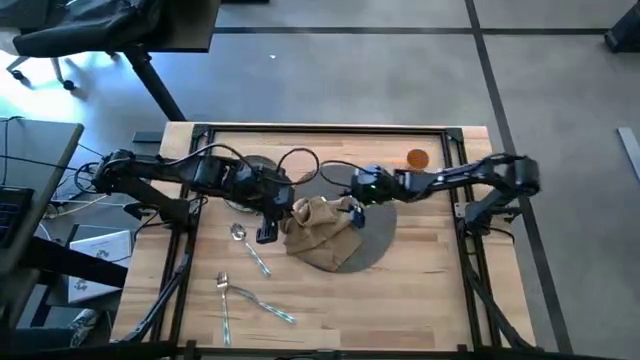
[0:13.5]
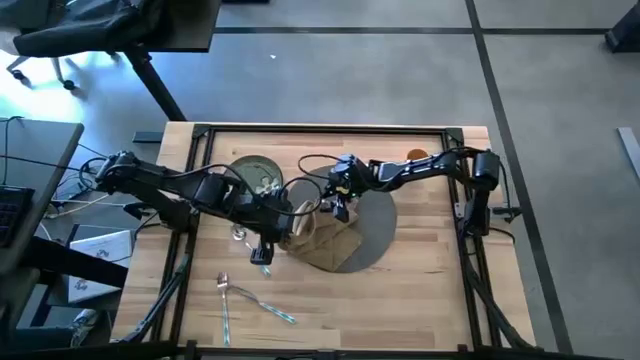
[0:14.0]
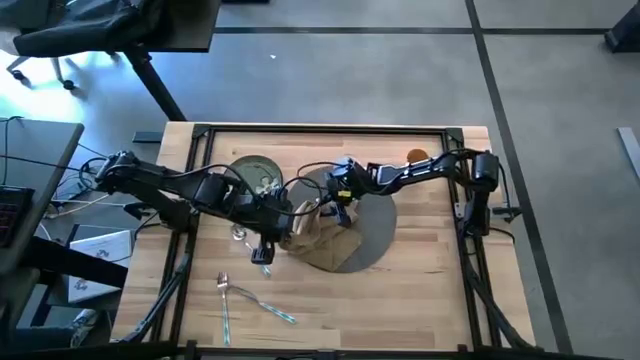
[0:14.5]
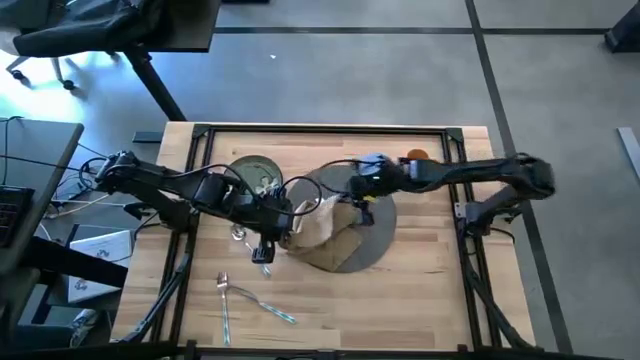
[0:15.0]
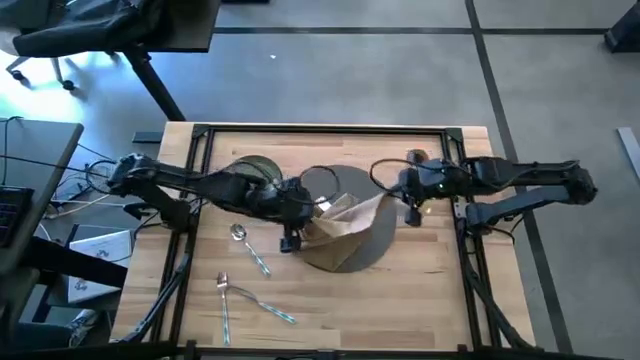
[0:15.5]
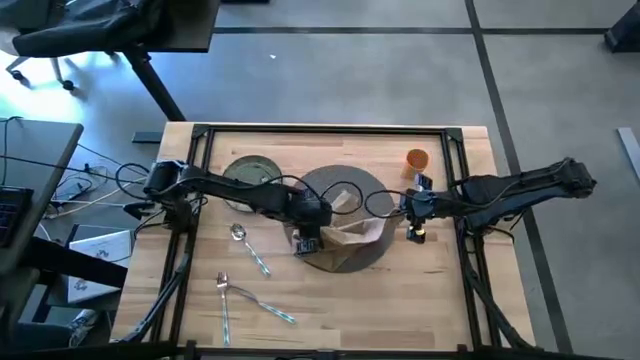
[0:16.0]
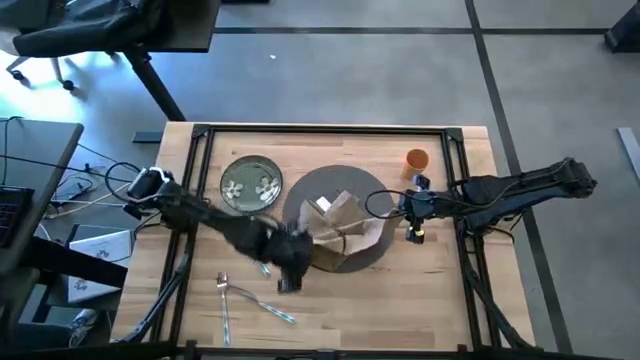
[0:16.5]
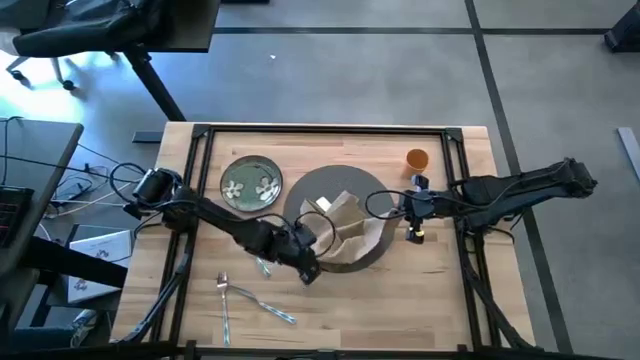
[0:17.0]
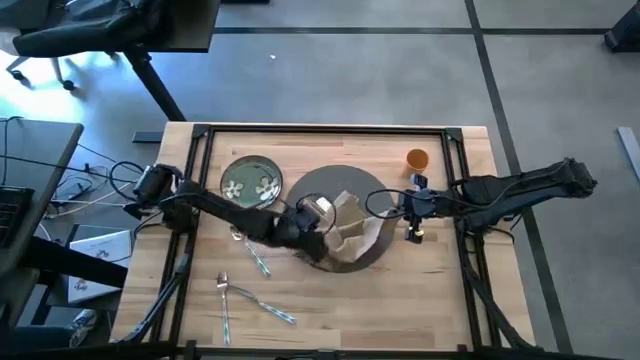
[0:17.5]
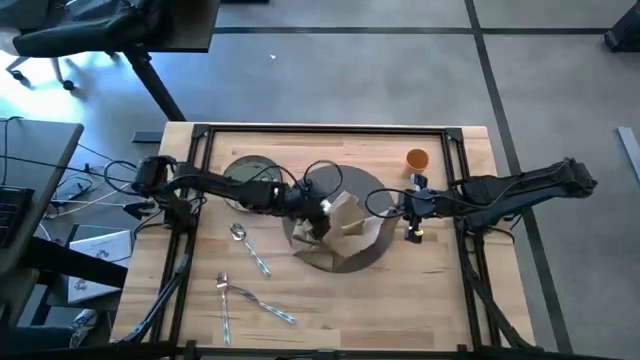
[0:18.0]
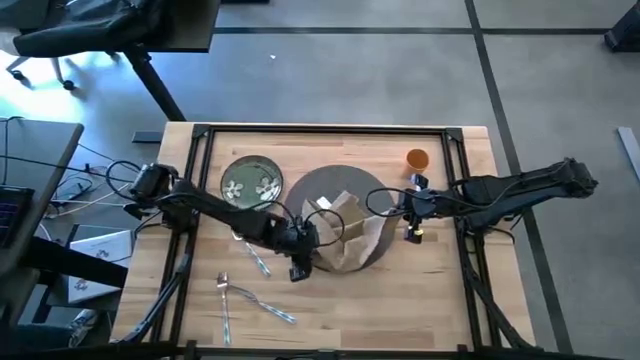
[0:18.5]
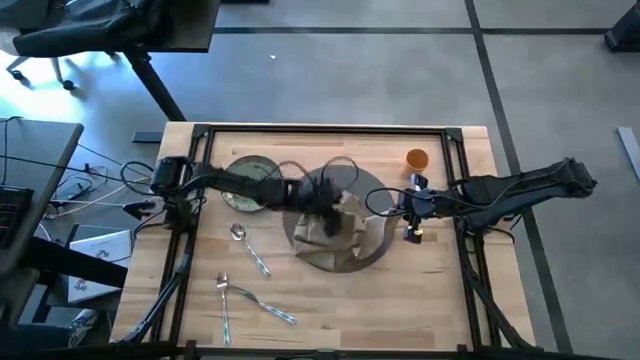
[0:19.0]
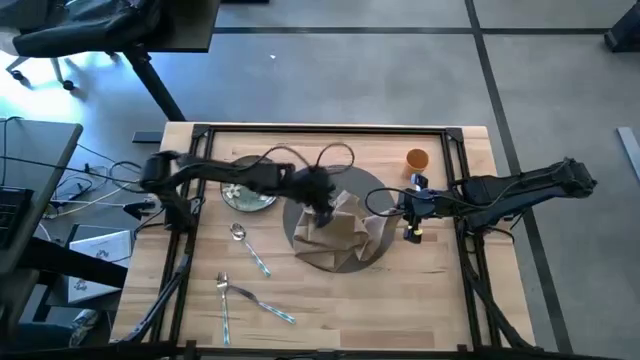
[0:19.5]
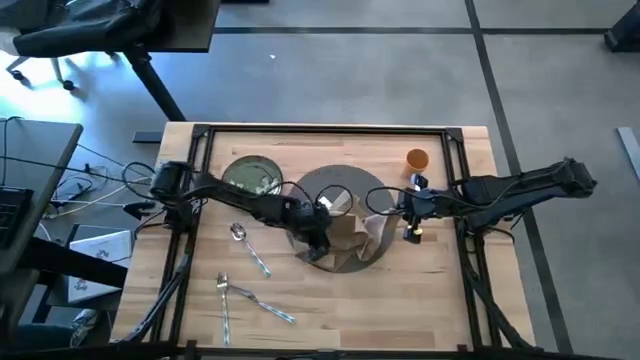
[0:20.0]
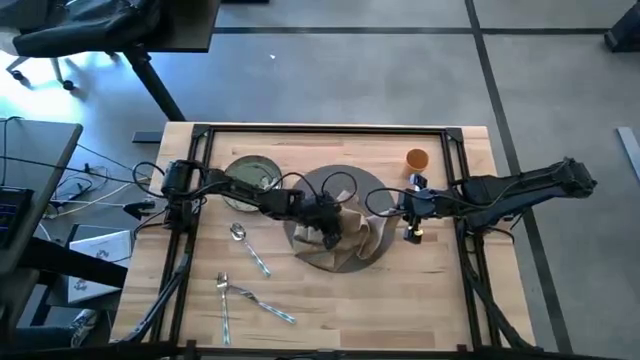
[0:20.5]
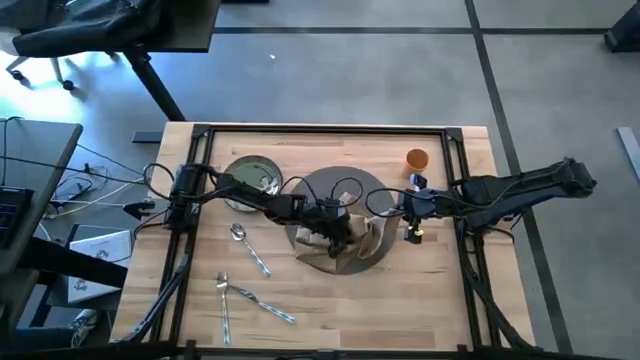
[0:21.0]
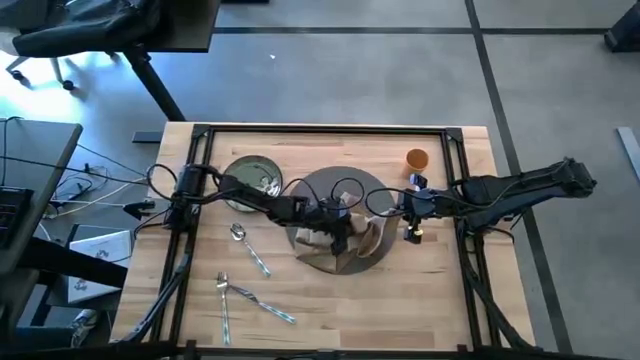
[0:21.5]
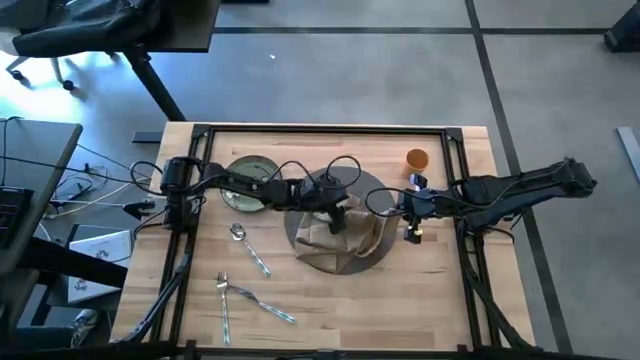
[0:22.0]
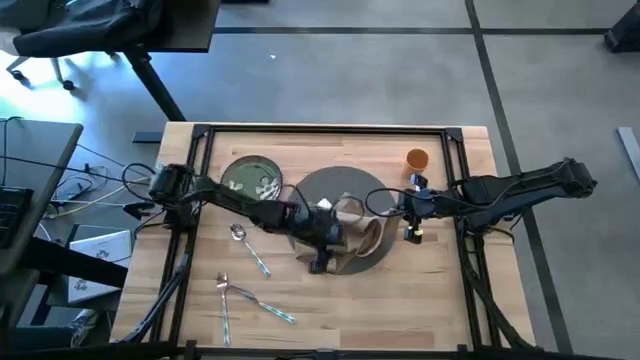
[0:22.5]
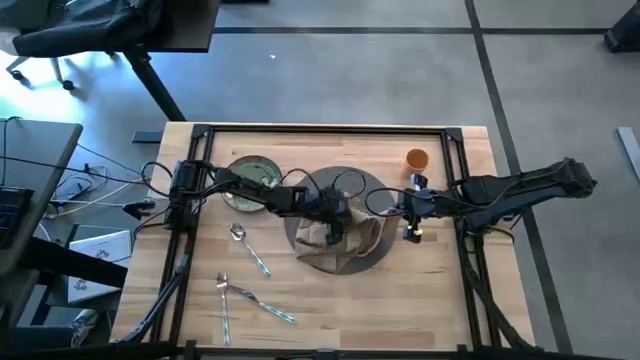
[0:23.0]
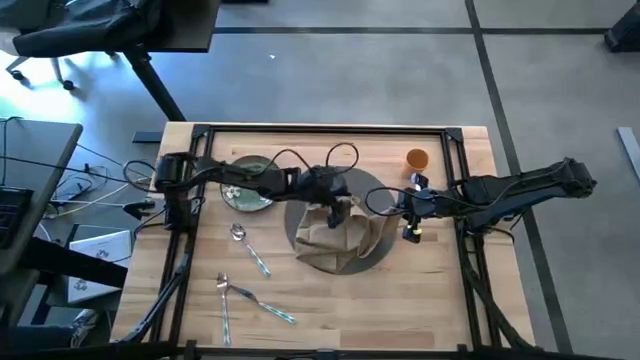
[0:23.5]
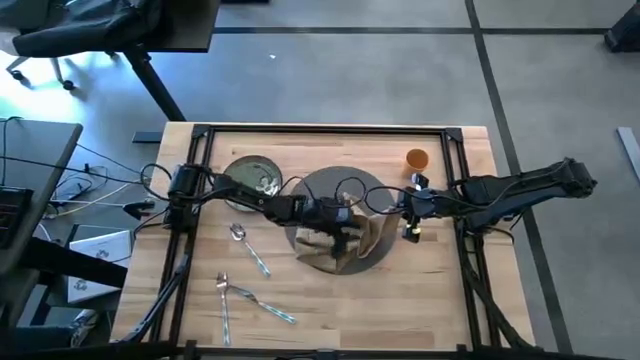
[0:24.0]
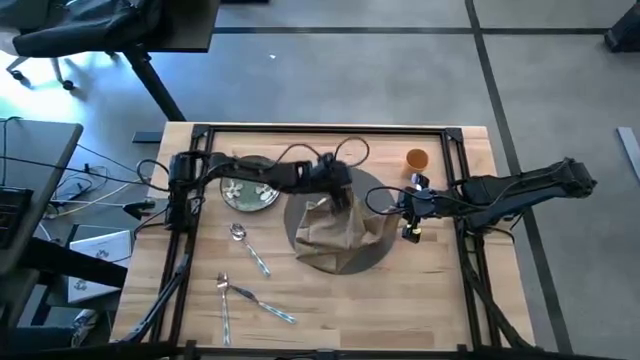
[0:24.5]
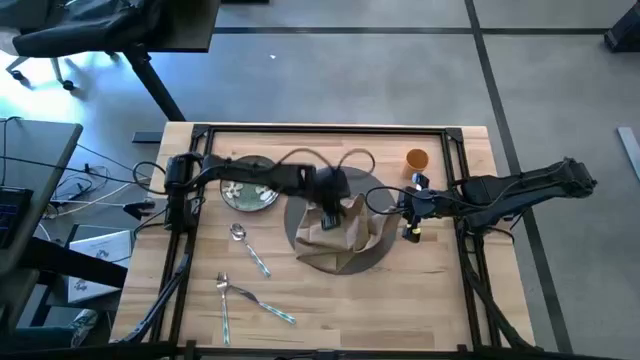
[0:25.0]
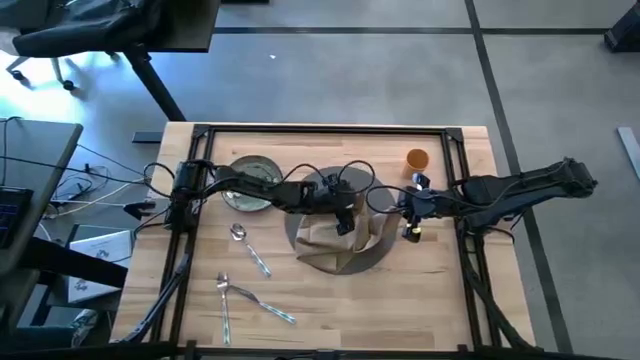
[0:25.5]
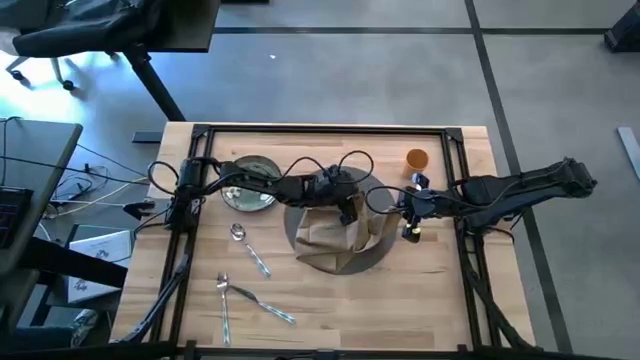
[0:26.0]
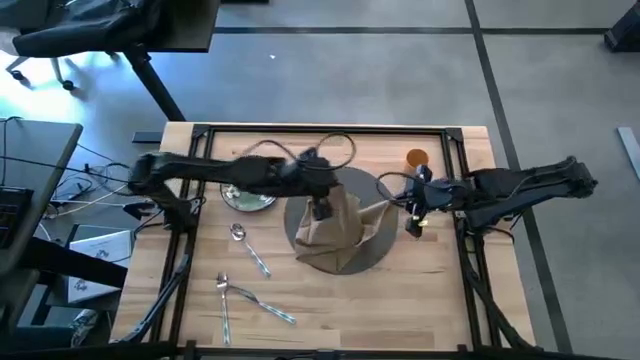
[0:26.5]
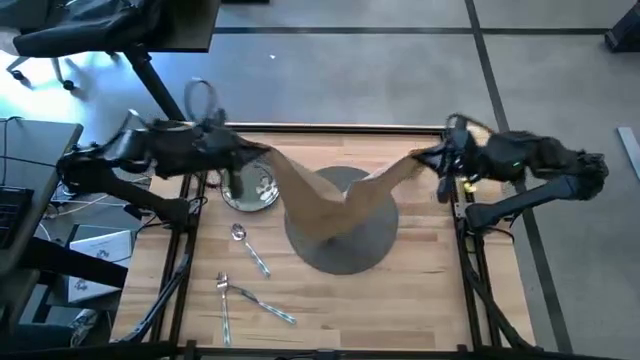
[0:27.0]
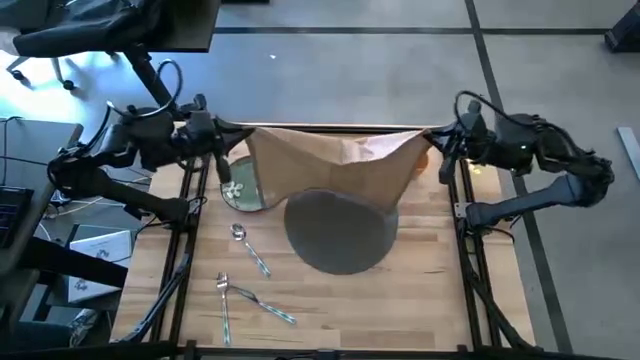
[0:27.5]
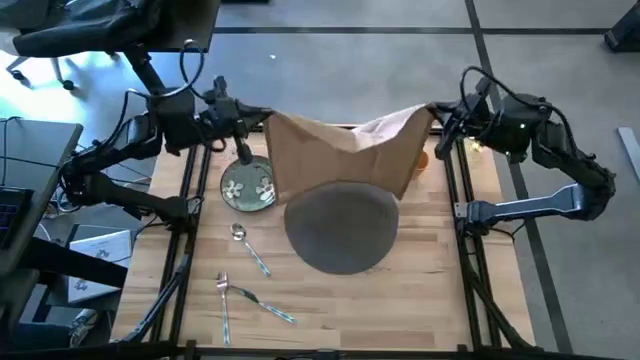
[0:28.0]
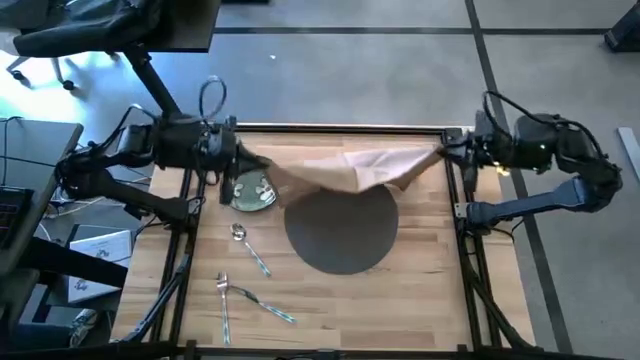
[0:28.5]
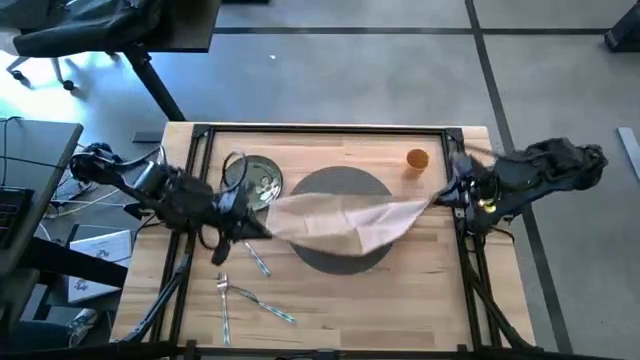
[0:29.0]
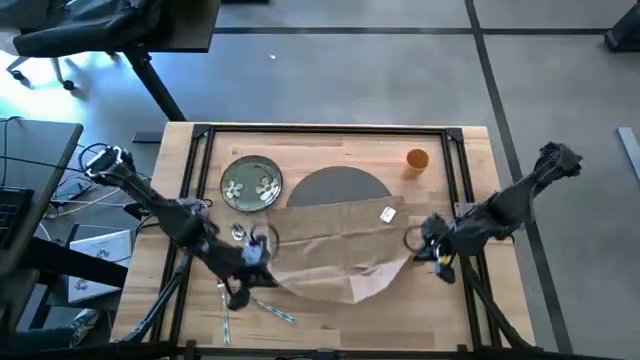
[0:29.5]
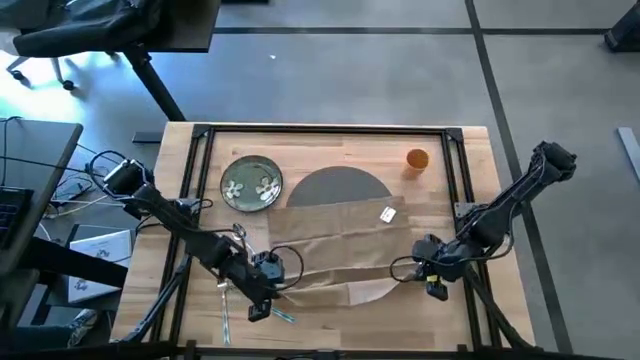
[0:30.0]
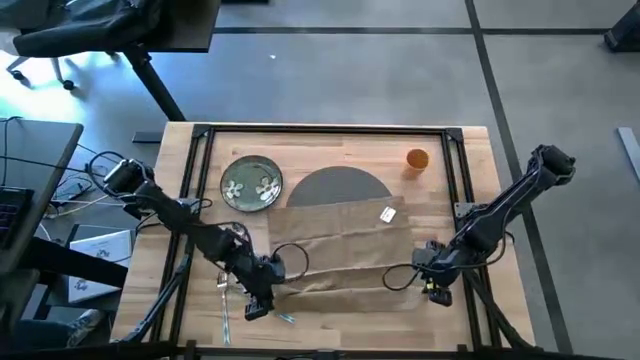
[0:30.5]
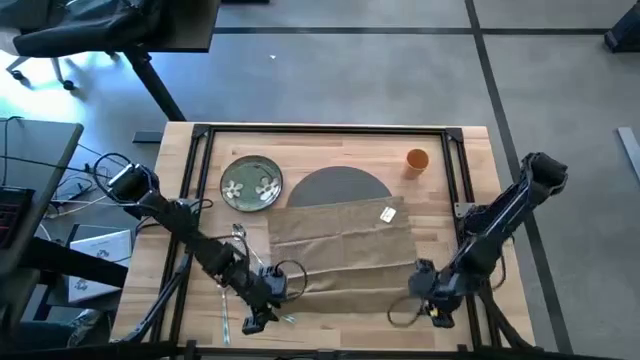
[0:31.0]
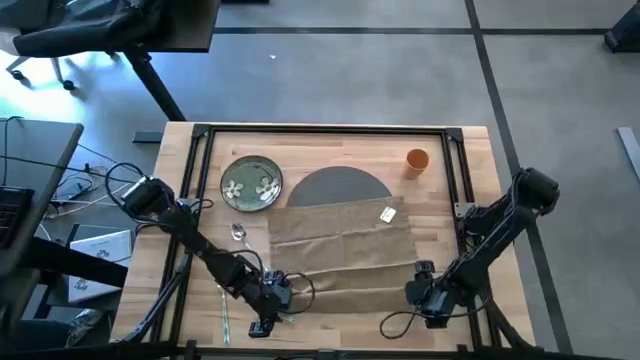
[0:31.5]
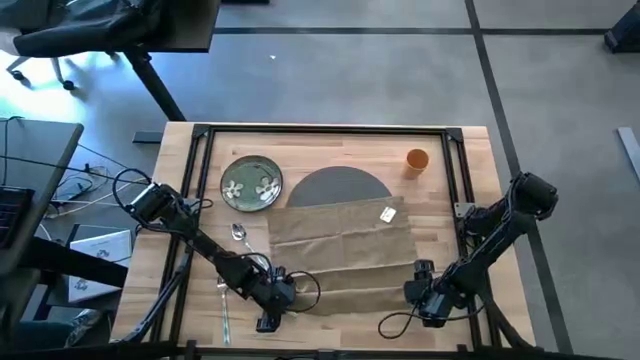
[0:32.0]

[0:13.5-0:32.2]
Task: Set table place
Fold the brown table napkin
